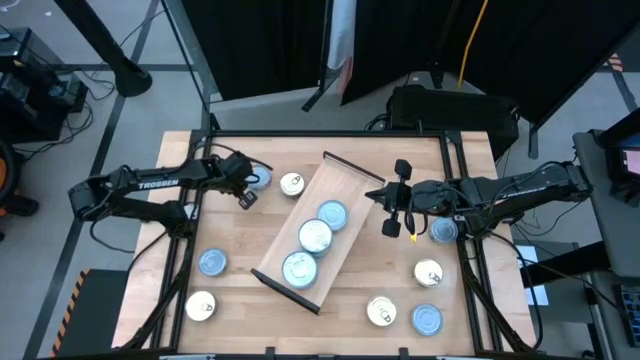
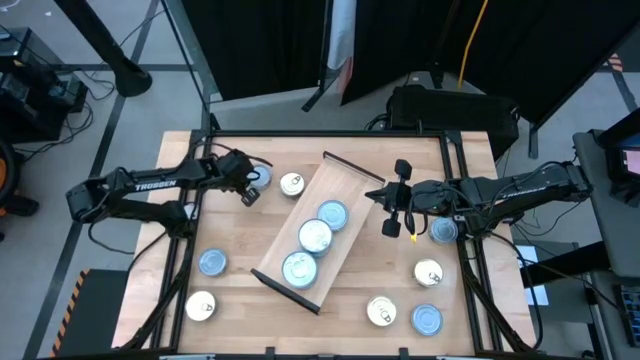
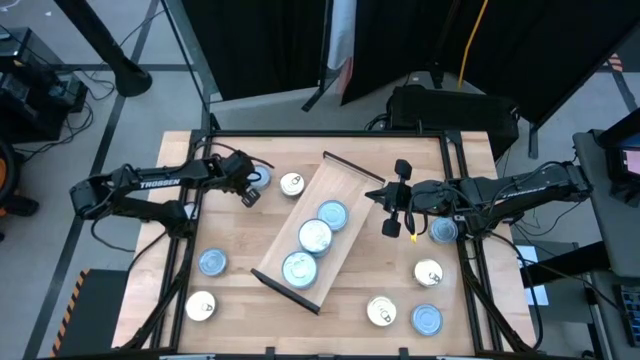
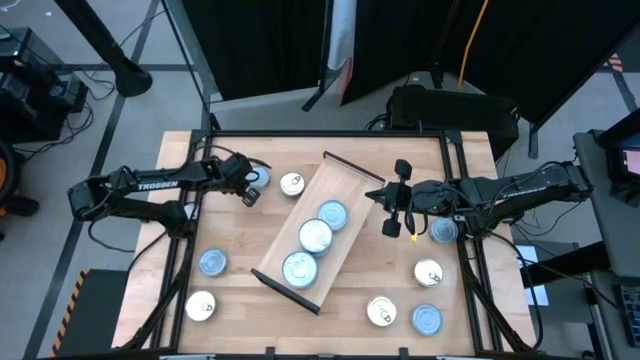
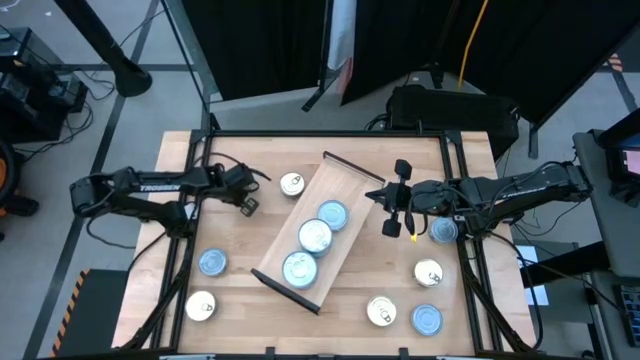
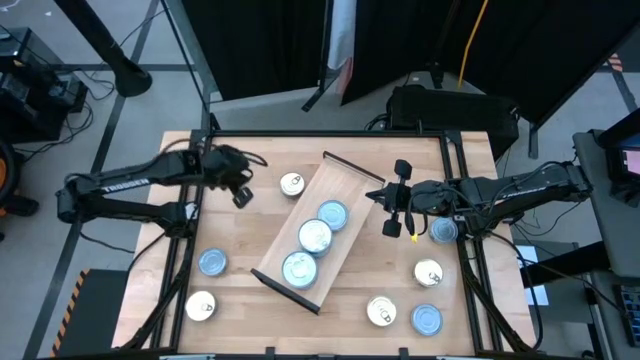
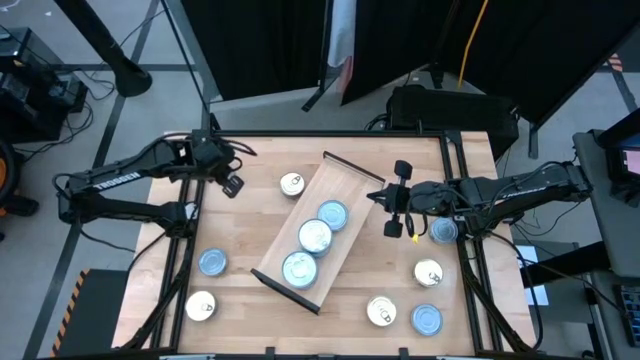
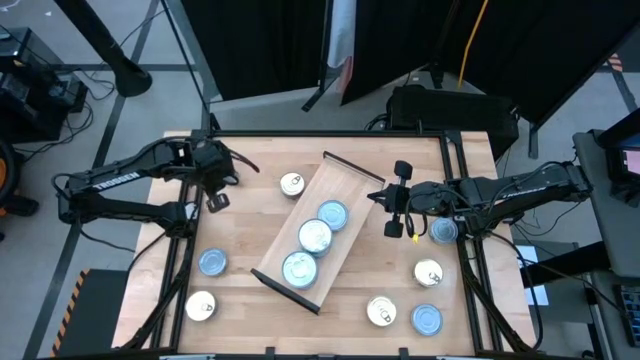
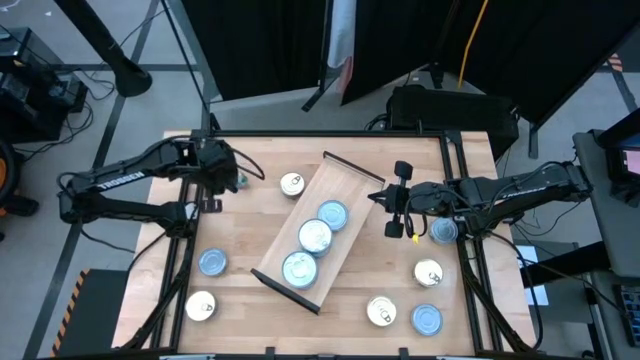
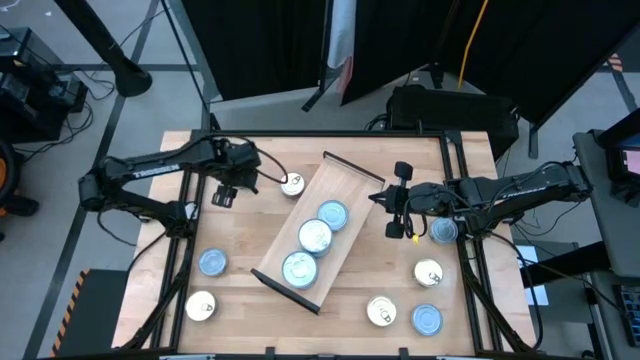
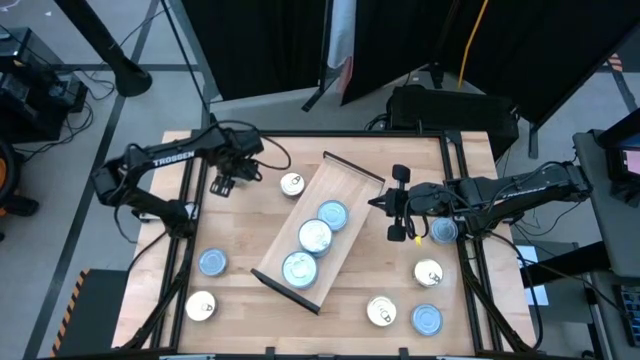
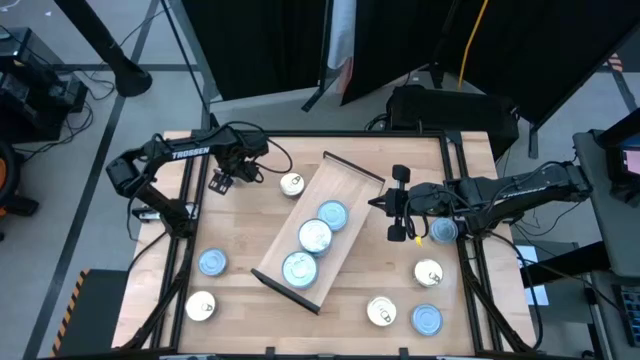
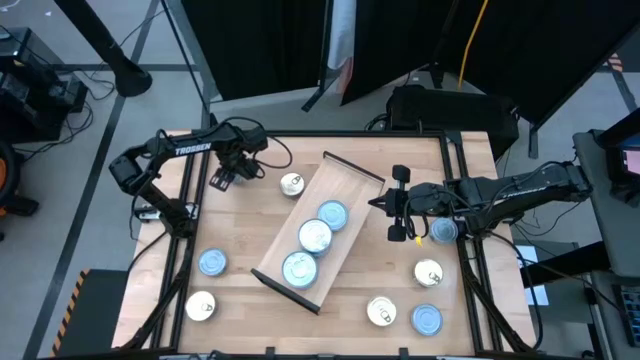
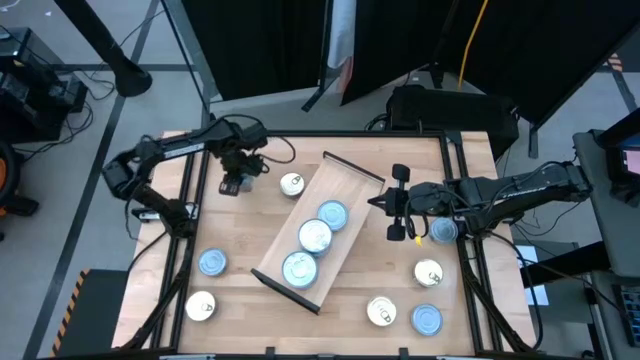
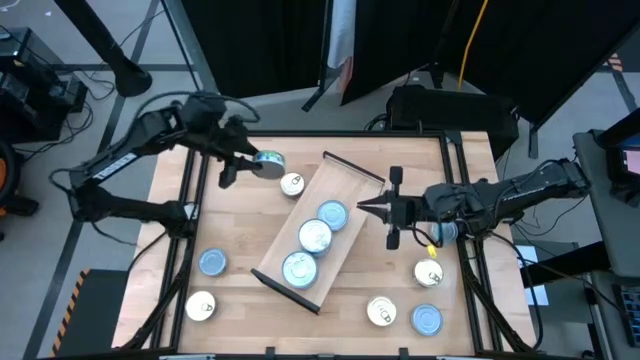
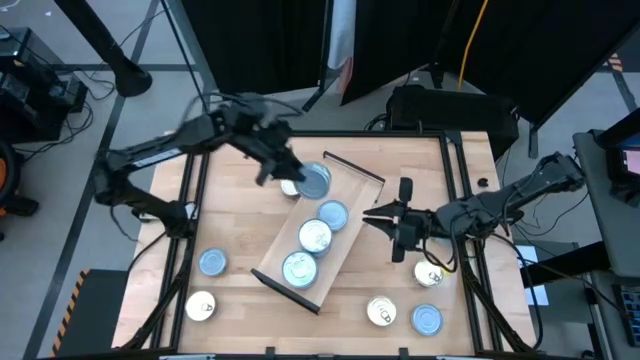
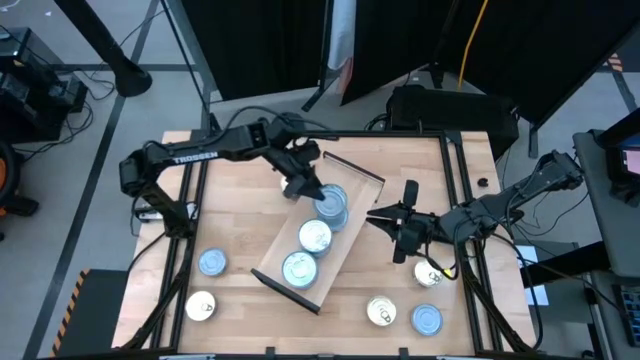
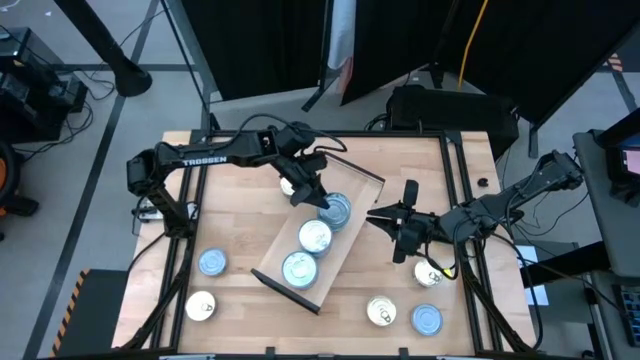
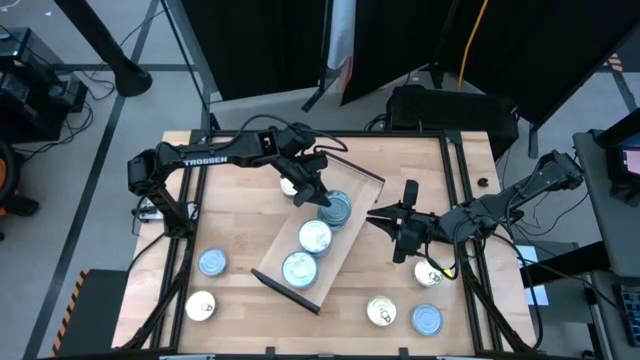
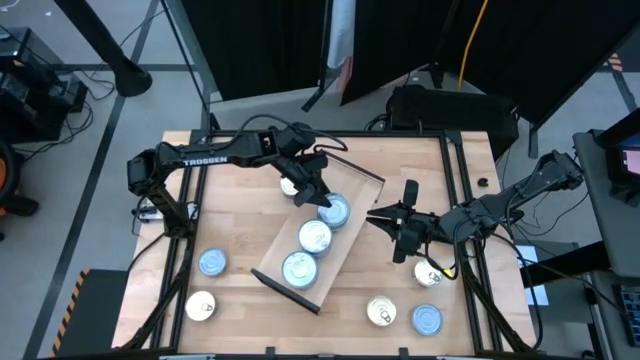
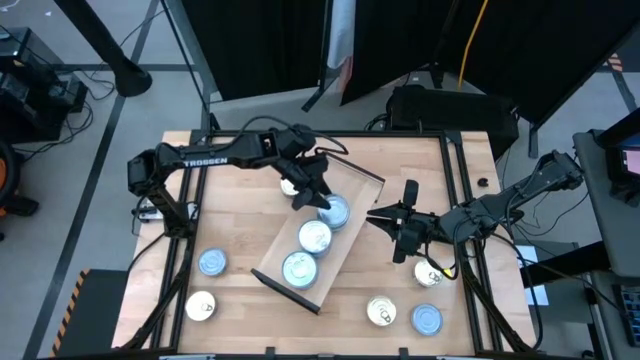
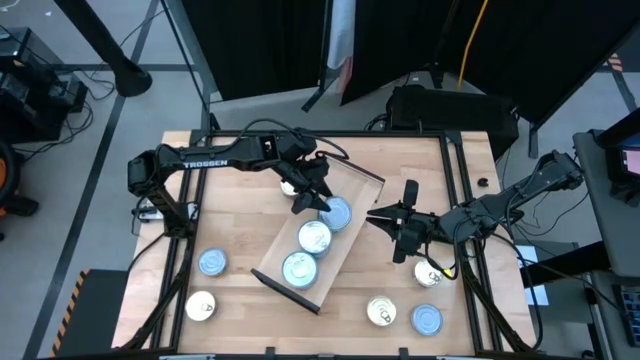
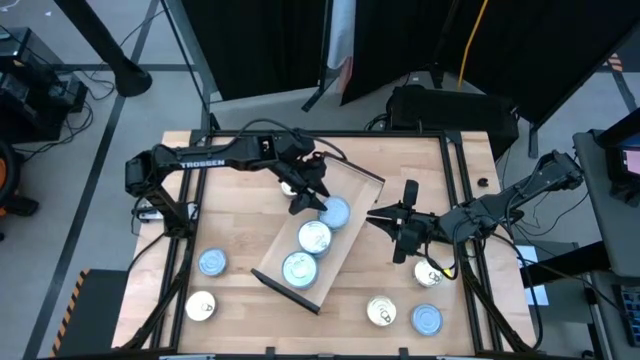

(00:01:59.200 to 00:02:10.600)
Task: Stack canned seafood by type on shelf
Stack the green tuna can on top of the other green tuna can on the shelf

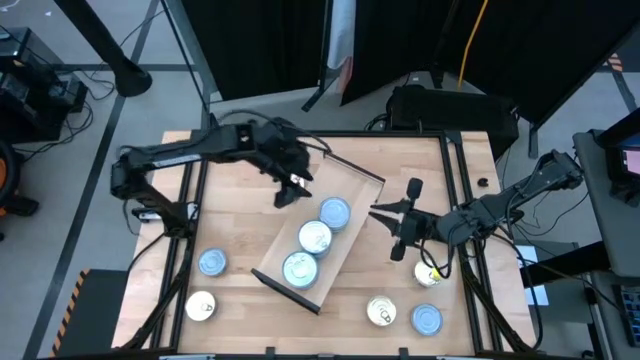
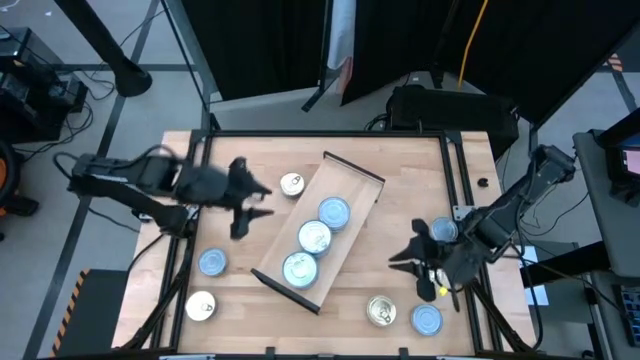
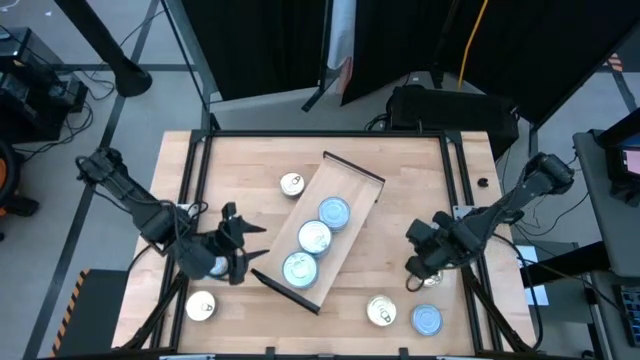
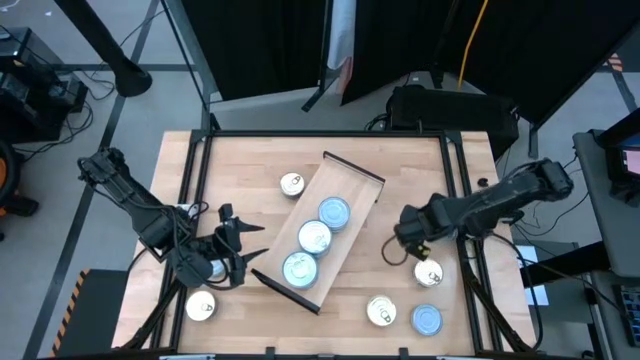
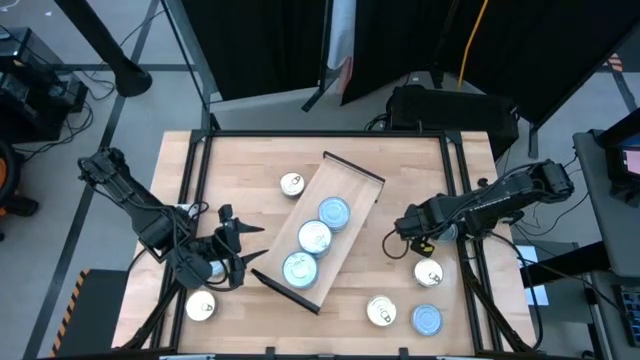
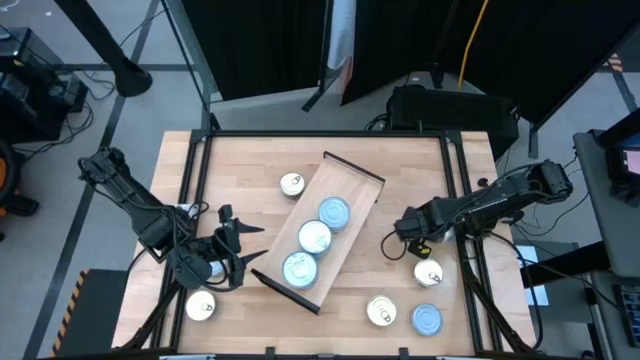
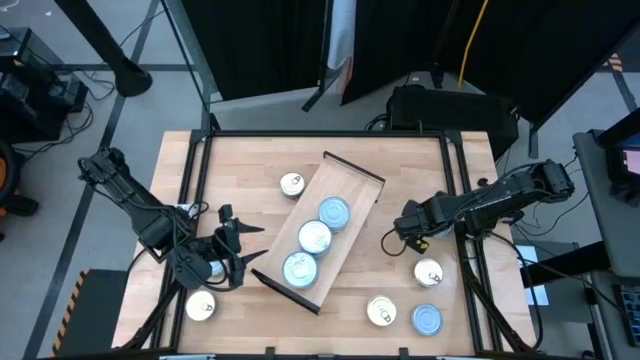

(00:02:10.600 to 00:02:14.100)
Stack the green tuna can on top of the other green tuna can on the shelf

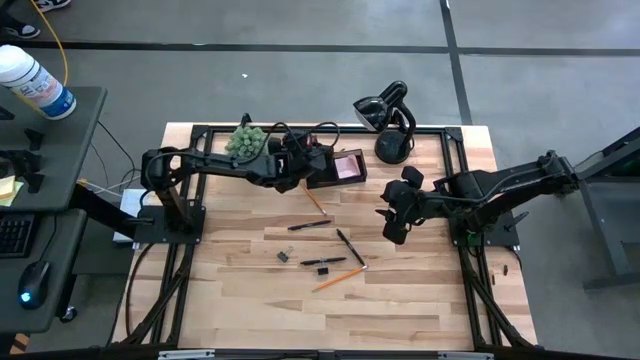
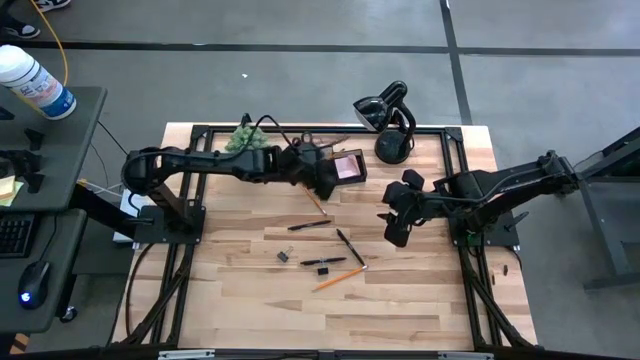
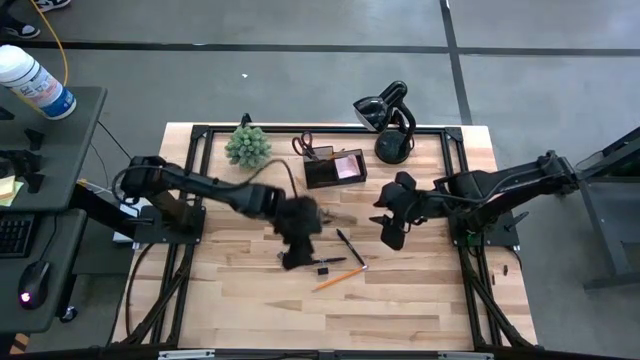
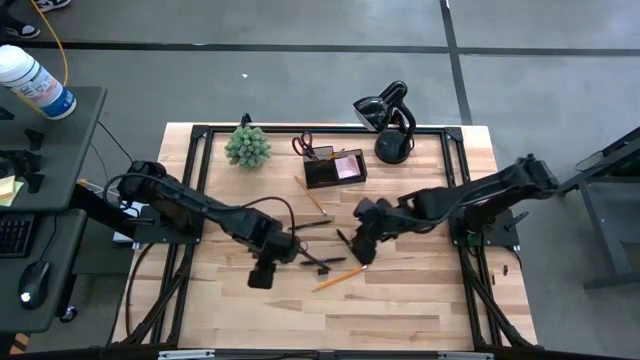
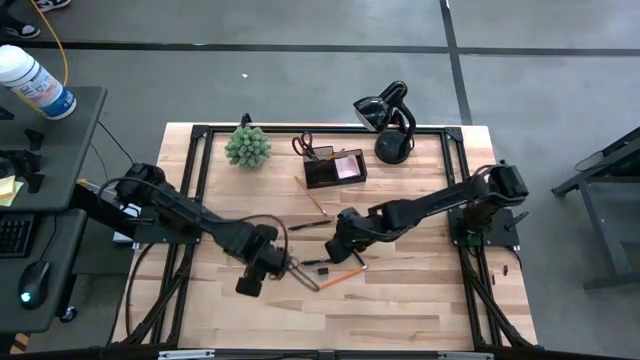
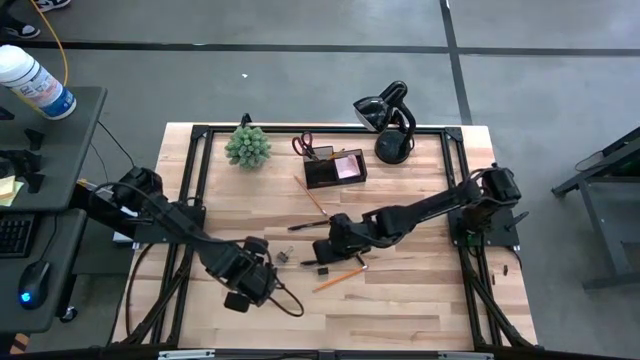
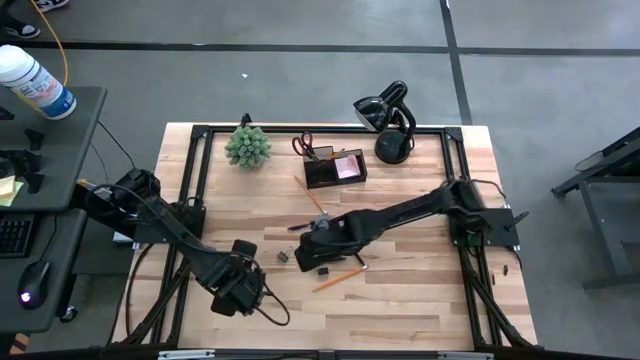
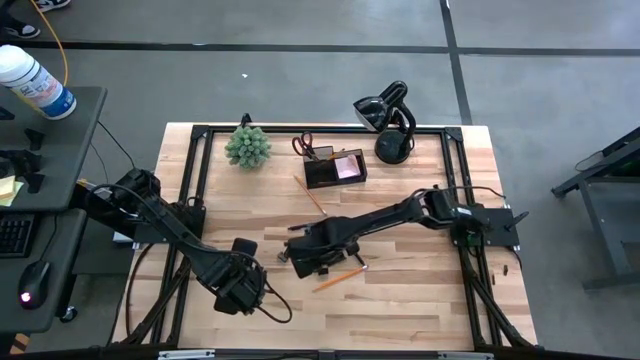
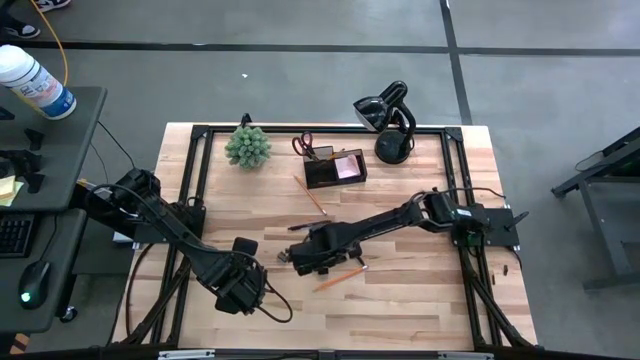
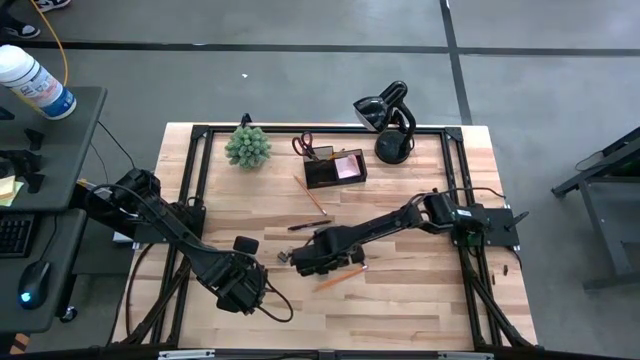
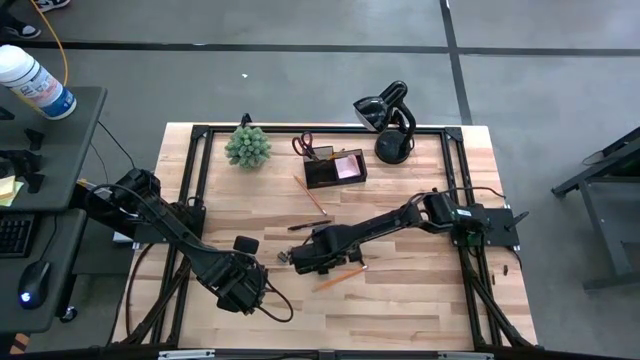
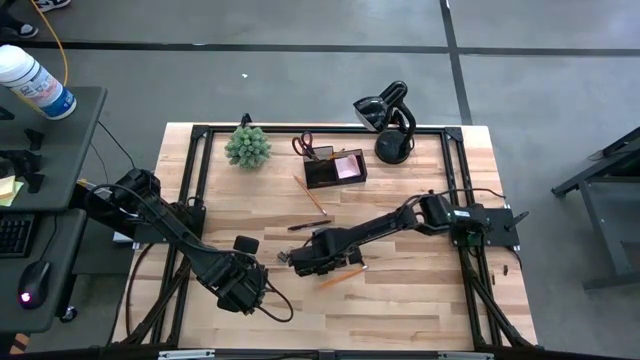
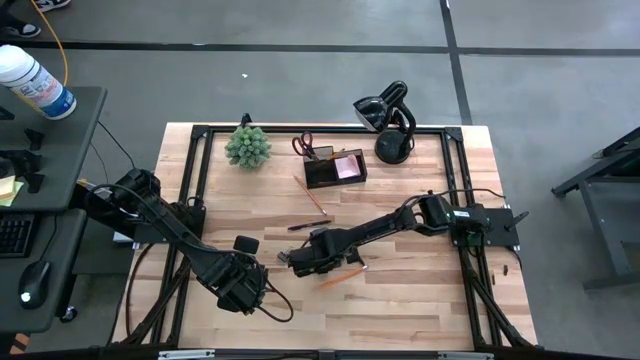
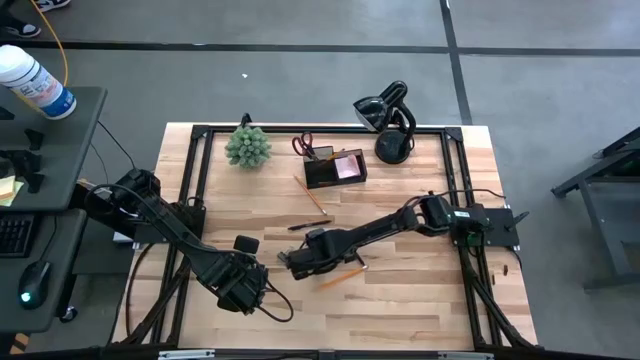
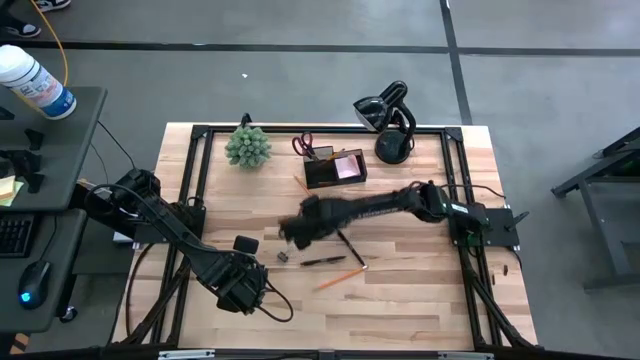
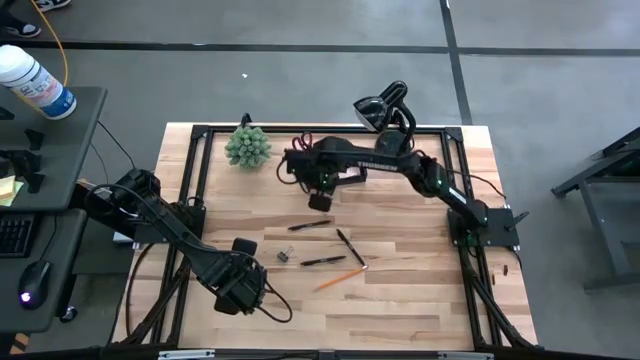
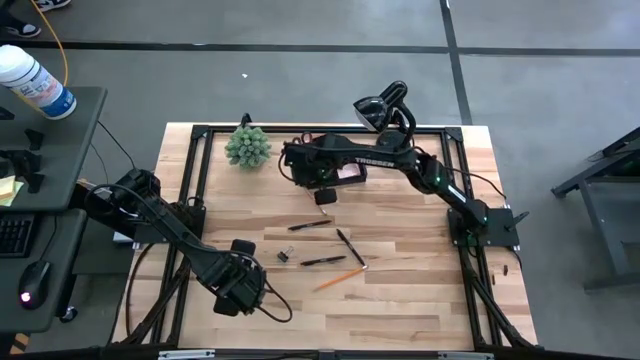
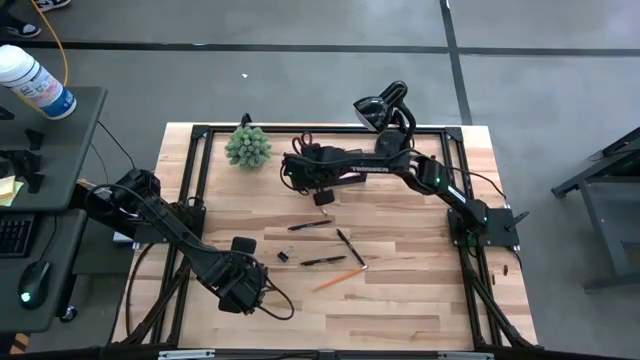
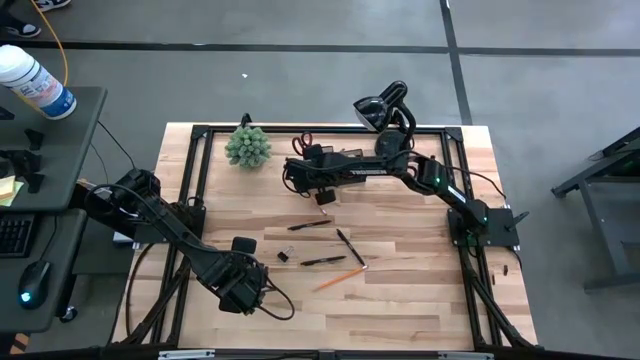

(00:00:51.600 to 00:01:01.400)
Task: Pick and place office supplies into organizer
Put the right black binder clip into the black desk organizer
